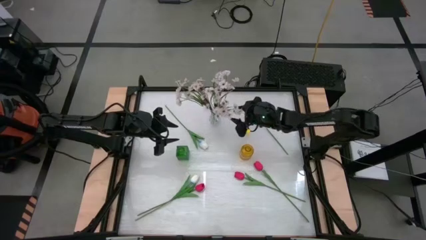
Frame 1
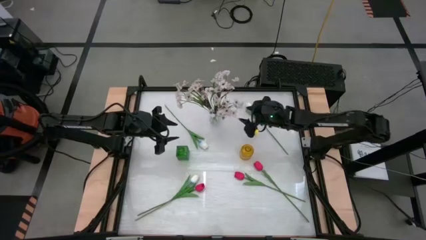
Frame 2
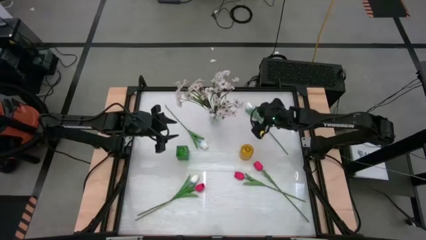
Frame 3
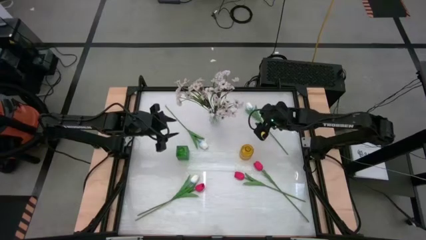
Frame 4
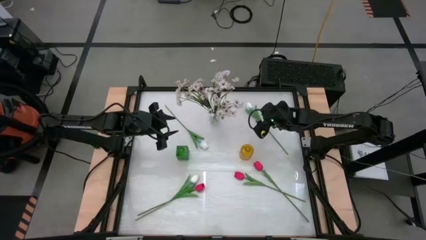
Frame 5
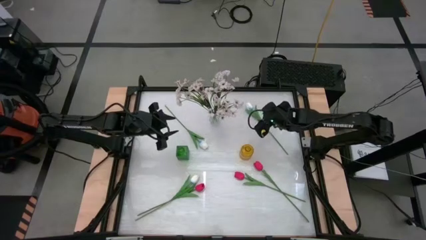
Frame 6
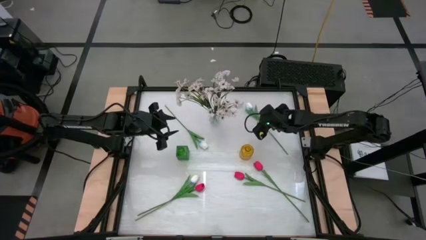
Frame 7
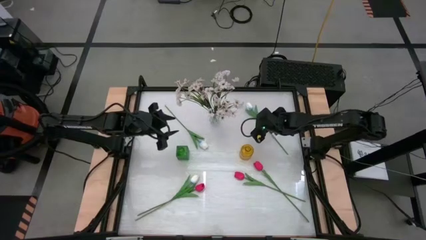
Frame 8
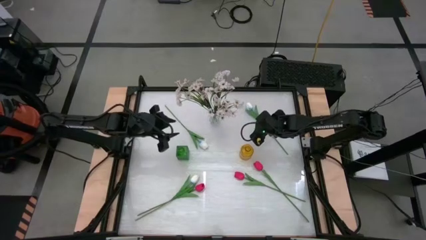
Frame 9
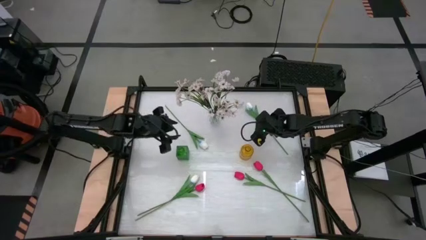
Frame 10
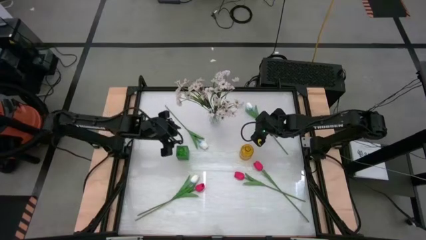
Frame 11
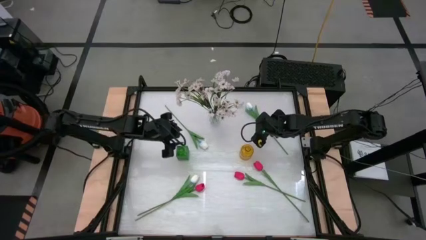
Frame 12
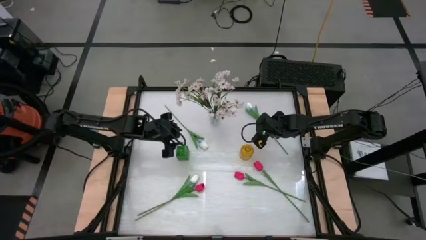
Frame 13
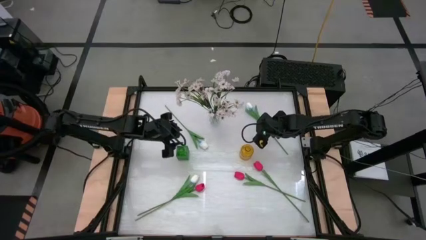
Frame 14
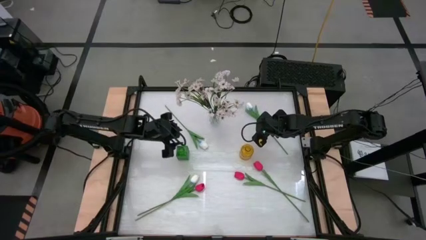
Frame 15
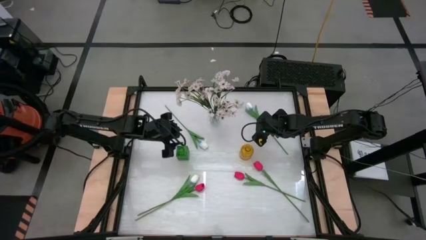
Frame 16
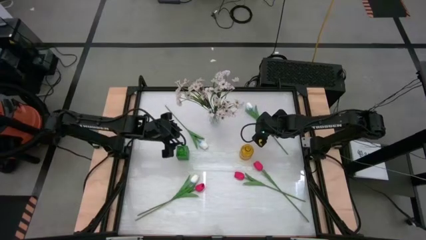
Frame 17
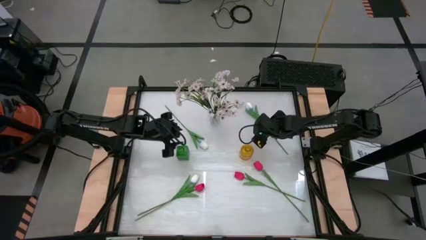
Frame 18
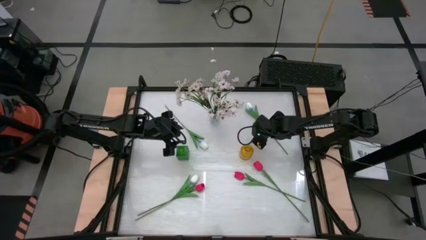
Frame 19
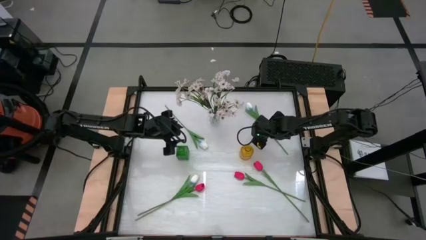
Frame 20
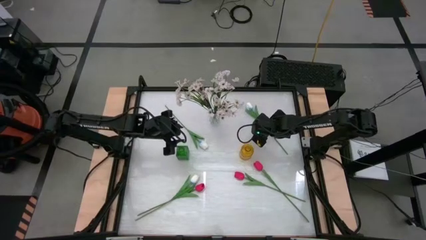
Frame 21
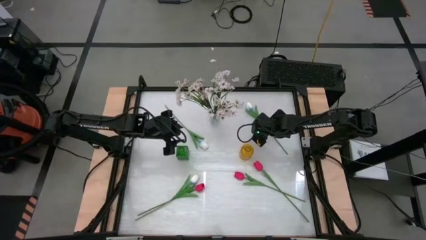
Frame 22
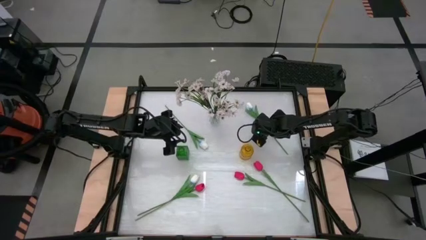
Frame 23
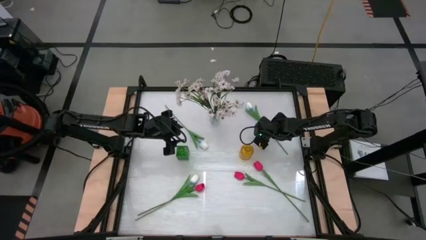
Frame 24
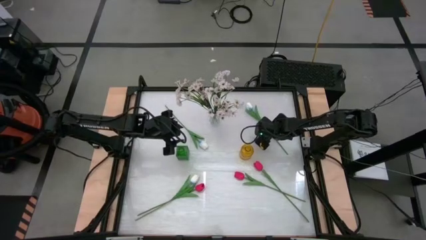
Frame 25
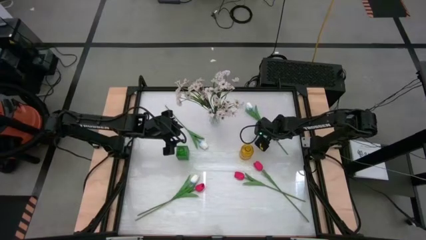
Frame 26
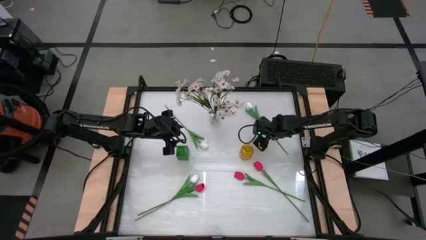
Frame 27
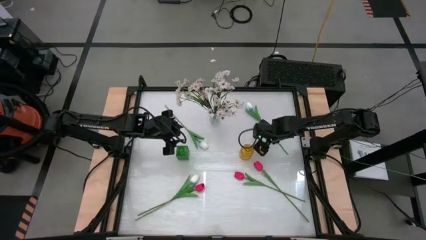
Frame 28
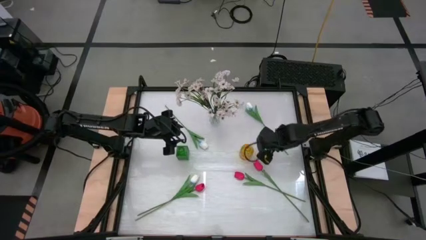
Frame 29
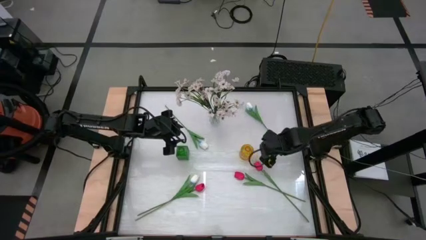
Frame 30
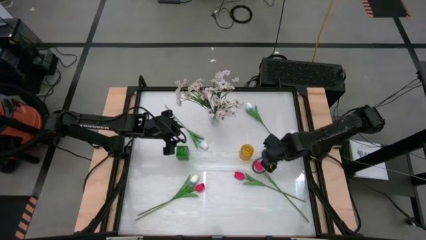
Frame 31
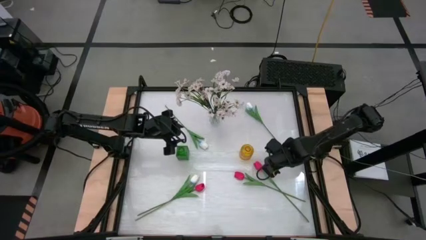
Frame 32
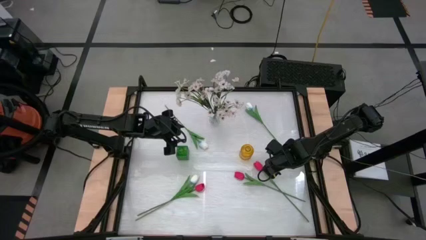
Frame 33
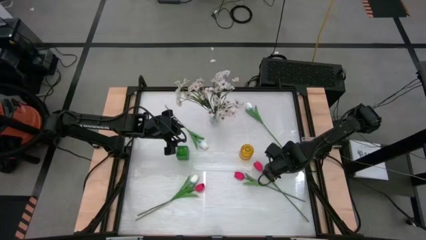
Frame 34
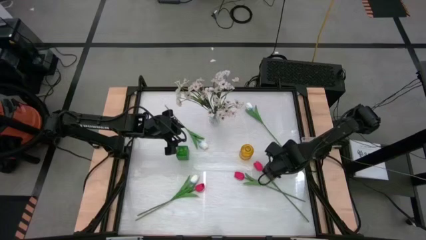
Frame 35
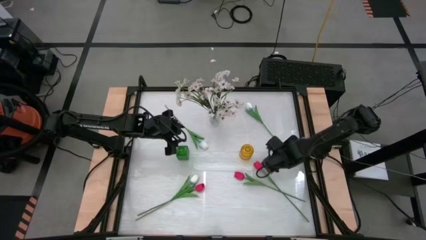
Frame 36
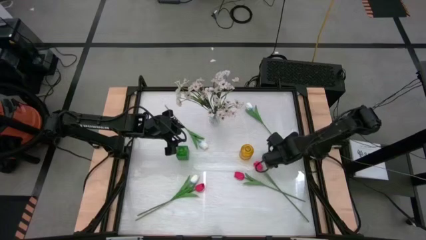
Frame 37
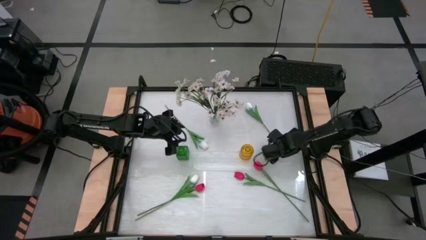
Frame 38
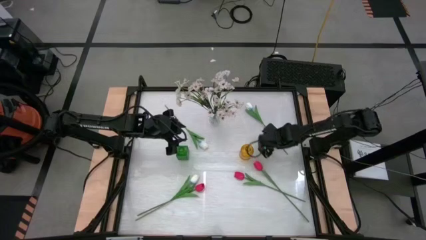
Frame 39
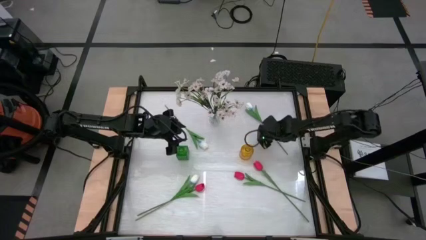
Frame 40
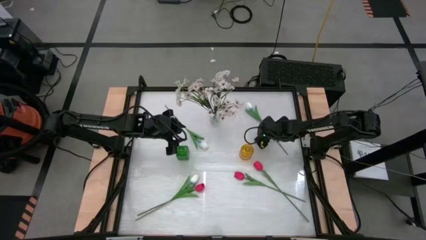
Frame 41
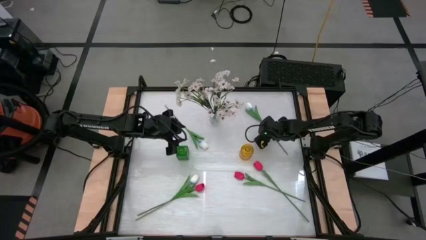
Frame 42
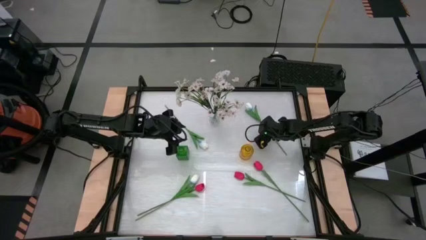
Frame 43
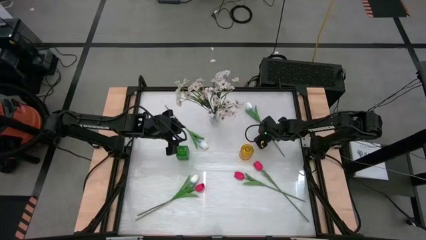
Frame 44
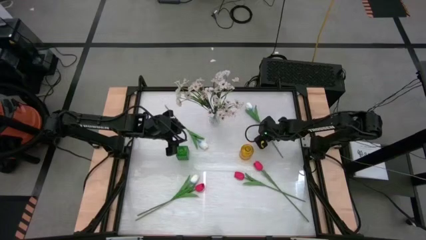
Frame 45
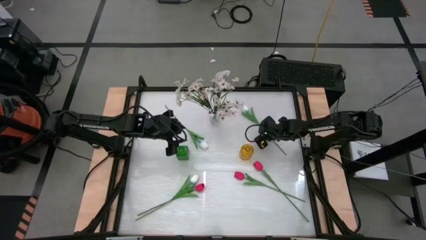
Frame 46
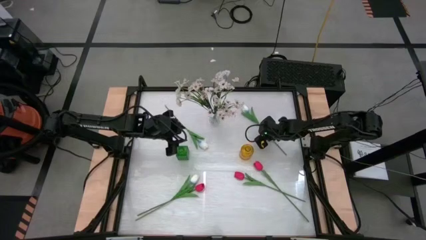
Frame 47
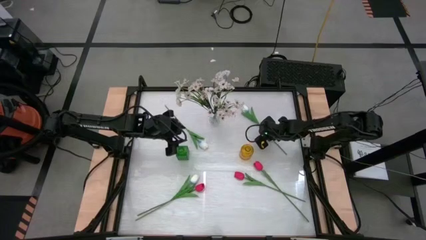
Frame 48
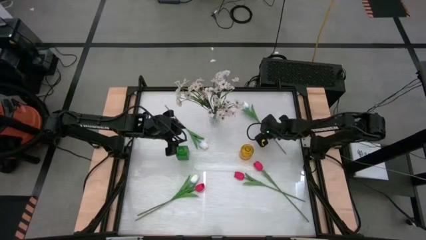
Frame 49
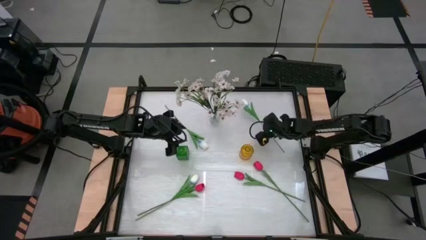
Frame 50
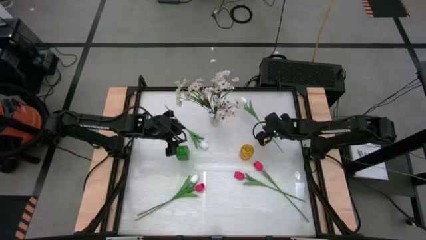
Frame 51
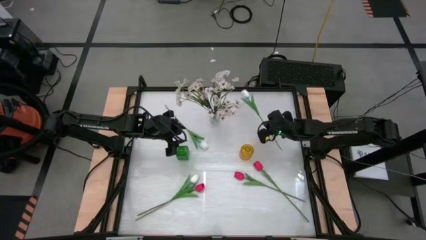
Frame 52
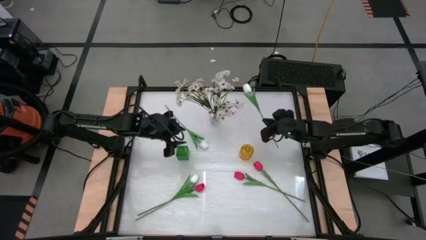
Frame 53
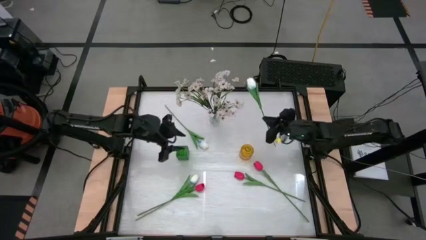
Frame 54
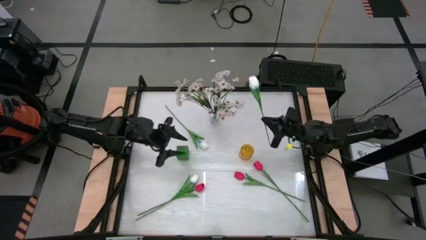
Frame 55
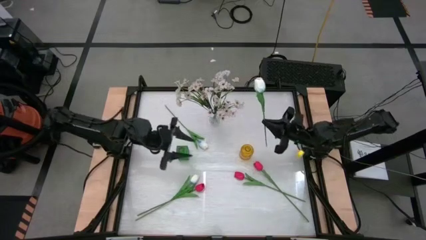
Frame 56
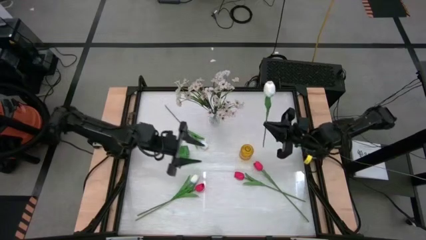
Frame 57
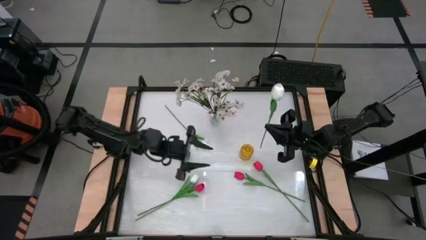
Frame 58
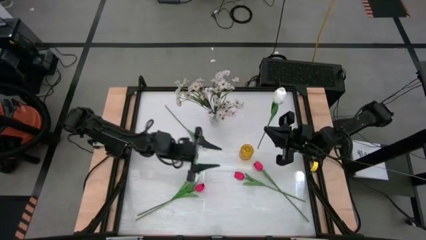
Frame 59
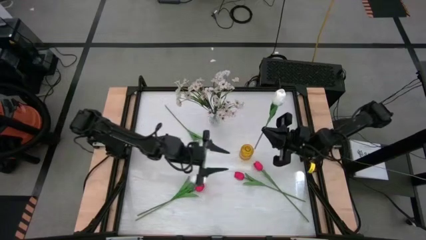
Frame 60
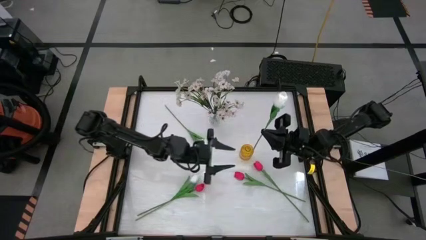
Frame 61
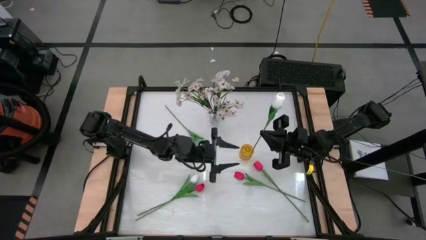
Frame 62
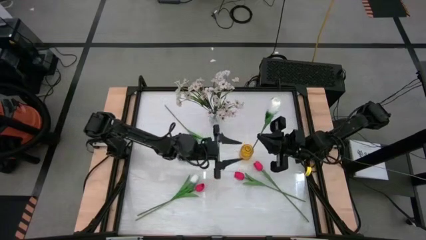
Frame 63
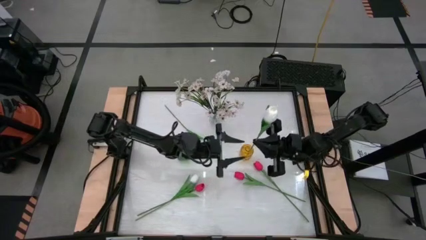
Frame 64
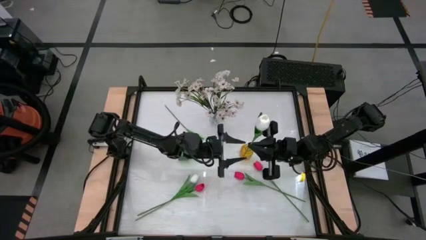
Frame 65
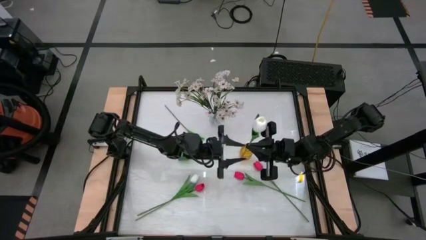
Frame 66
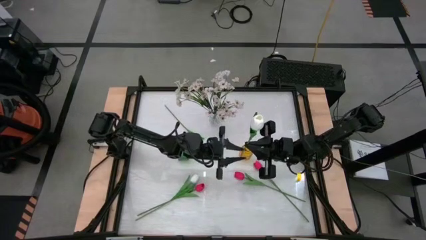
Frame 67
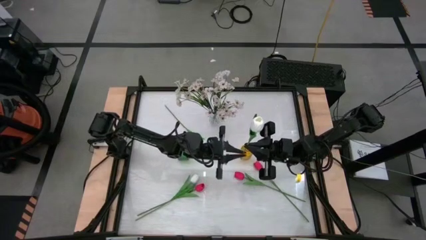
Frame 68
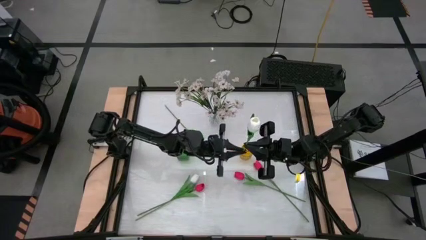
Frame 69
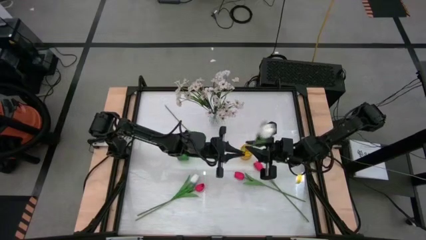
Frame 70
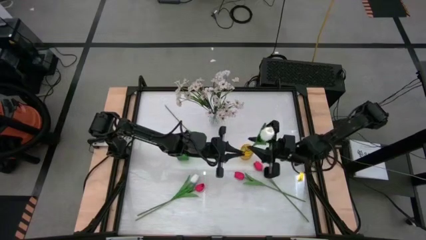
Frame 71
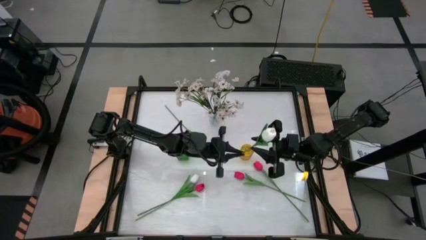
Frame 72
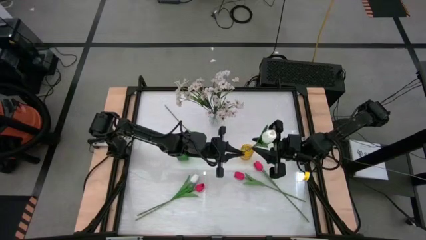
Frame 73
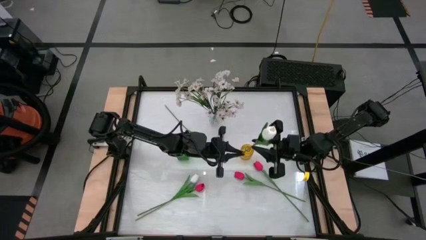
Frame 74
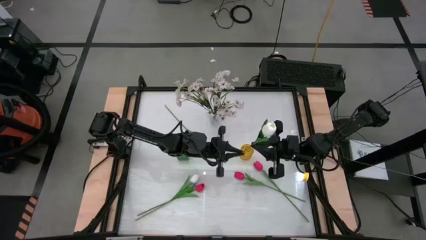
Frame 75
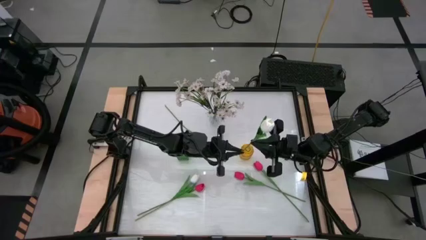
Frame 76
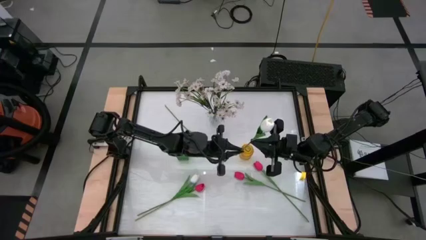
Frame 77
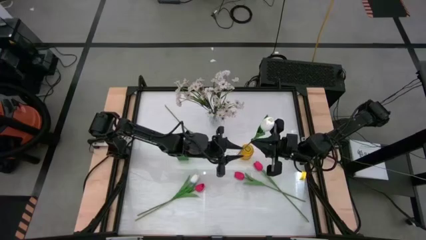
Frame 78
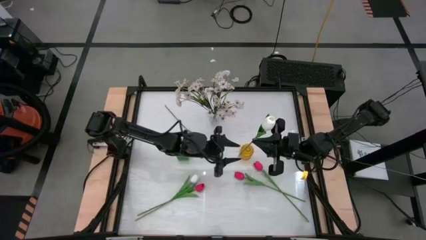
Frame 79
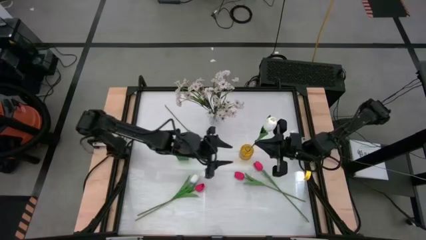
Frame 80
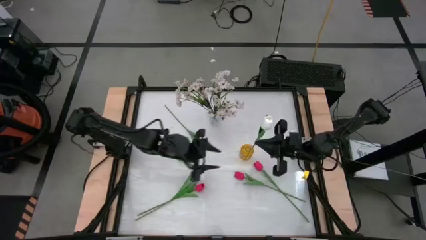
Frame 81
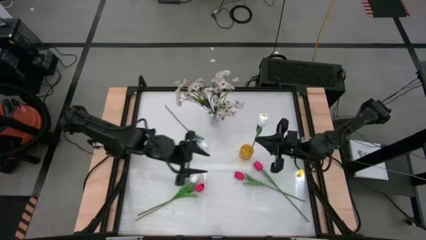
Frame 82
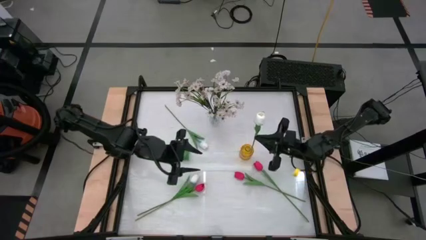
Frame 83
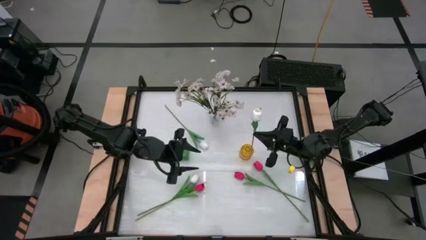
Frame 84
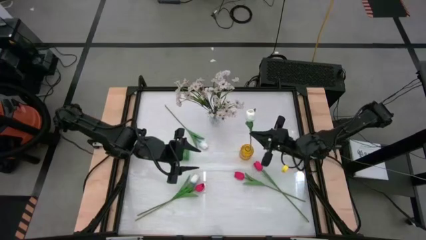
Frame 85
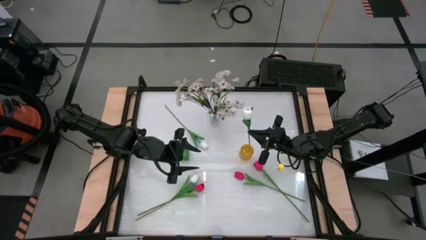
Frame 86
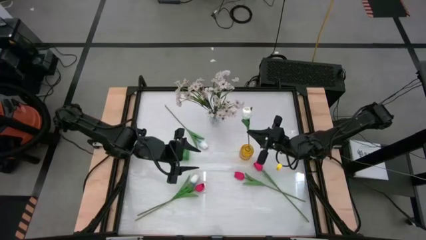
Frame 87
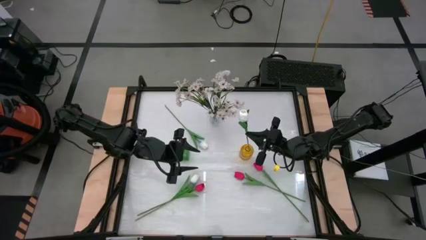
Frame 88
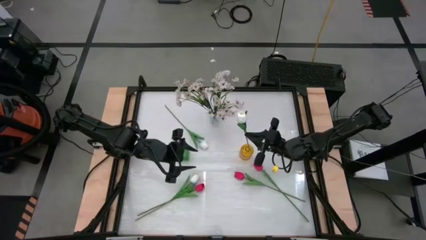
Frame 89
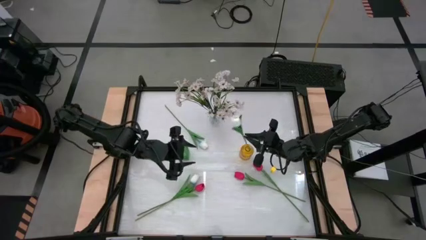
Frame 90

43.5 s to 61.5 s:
Task: Sort flowers into vase by color
Put the top right white flower into the yellow vase
